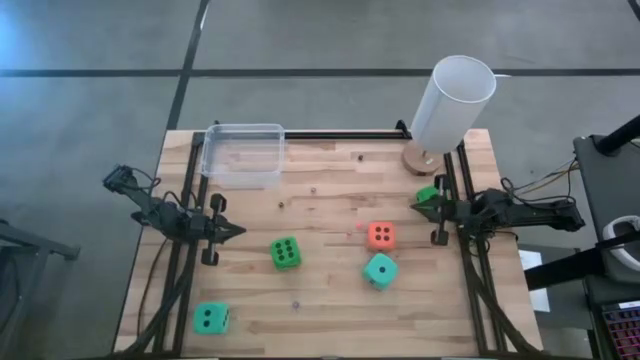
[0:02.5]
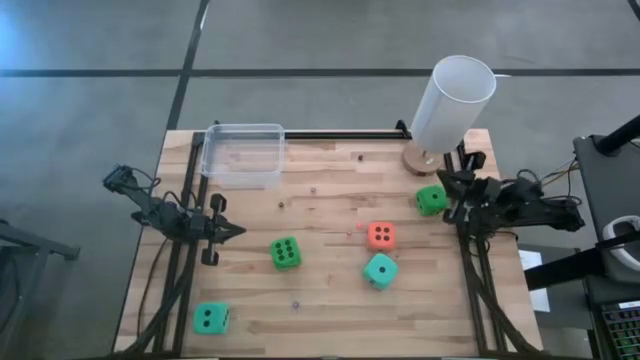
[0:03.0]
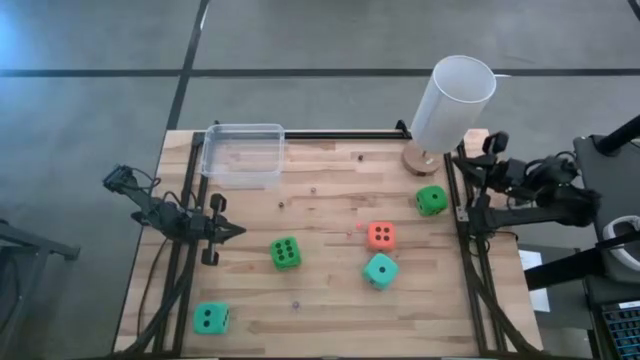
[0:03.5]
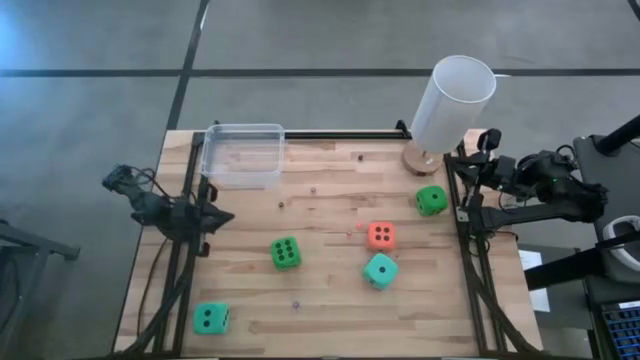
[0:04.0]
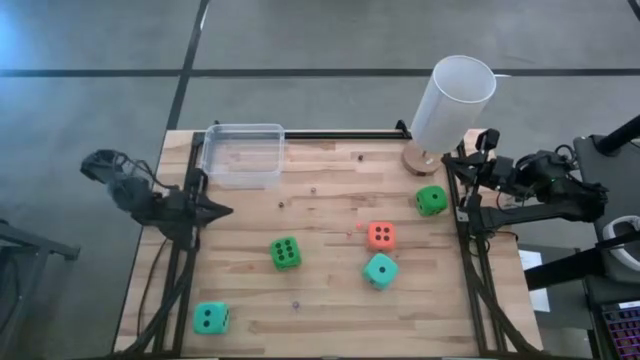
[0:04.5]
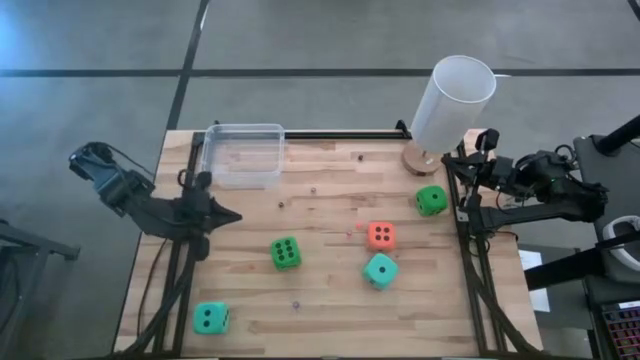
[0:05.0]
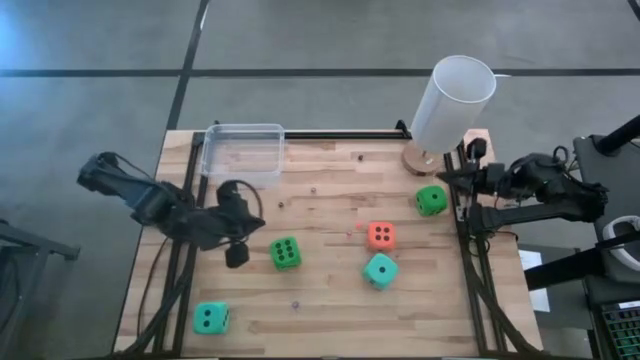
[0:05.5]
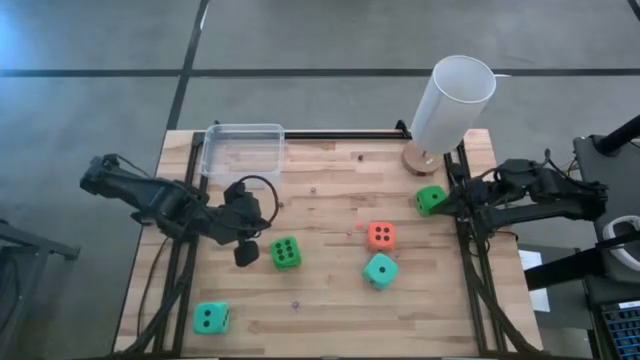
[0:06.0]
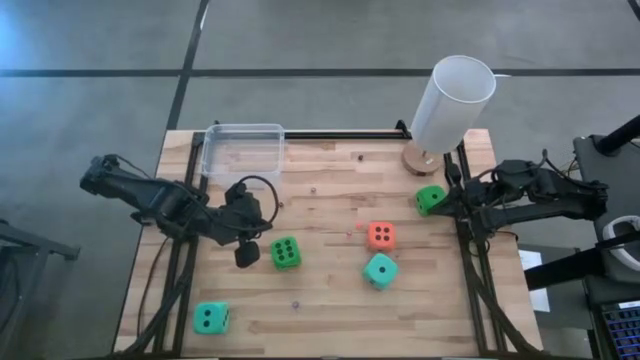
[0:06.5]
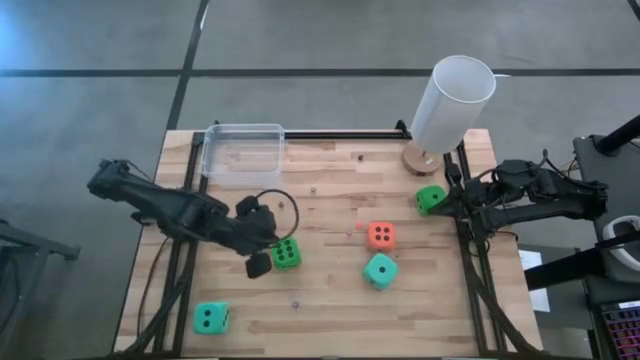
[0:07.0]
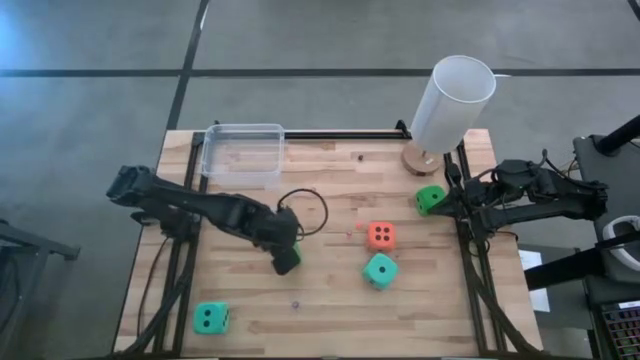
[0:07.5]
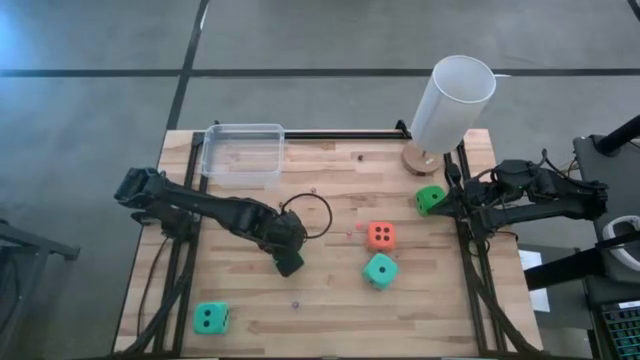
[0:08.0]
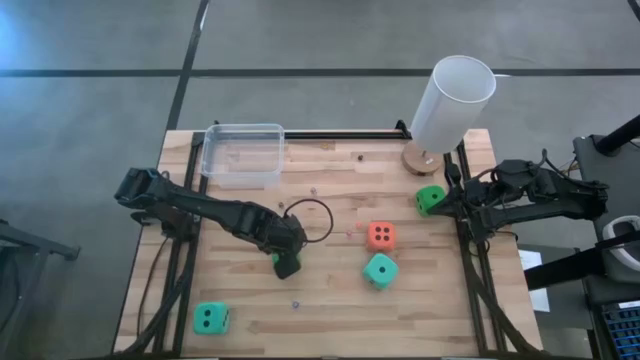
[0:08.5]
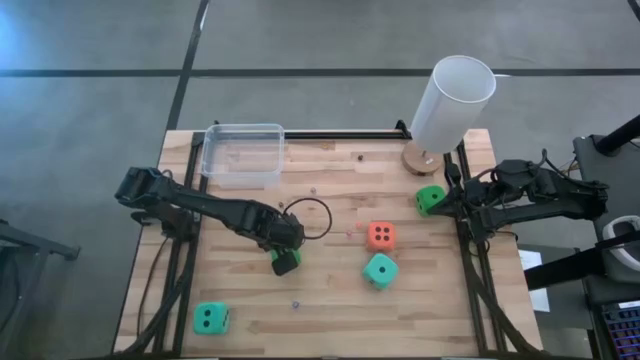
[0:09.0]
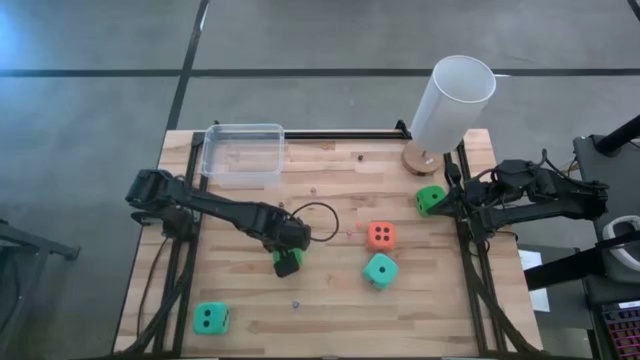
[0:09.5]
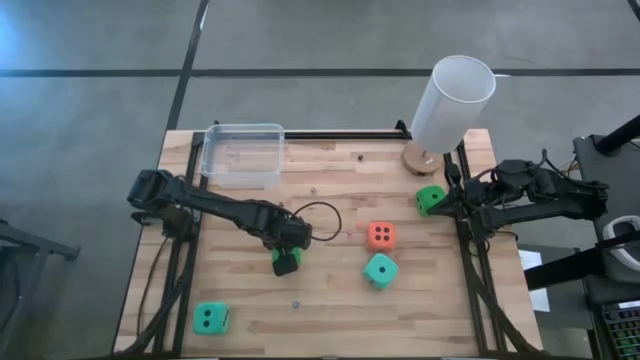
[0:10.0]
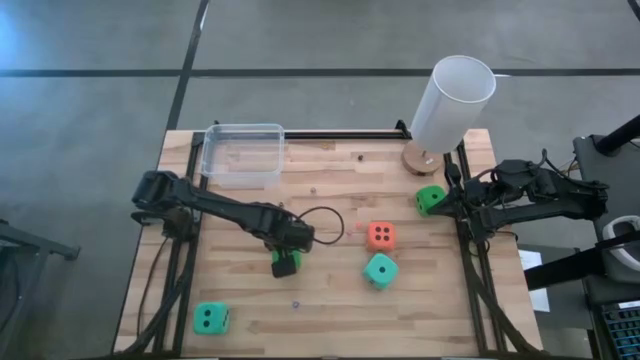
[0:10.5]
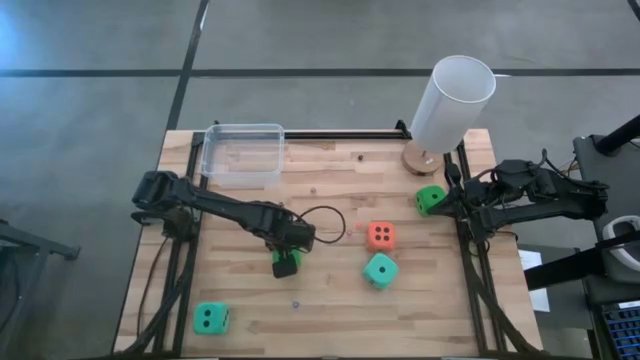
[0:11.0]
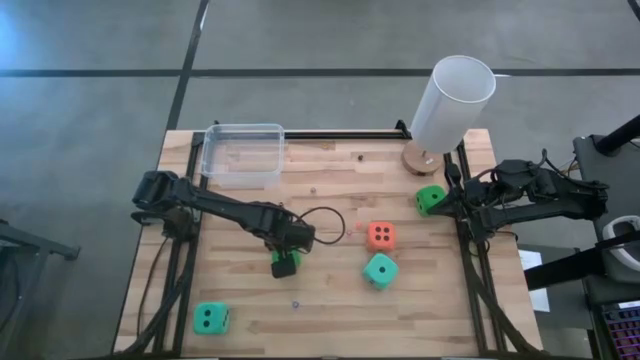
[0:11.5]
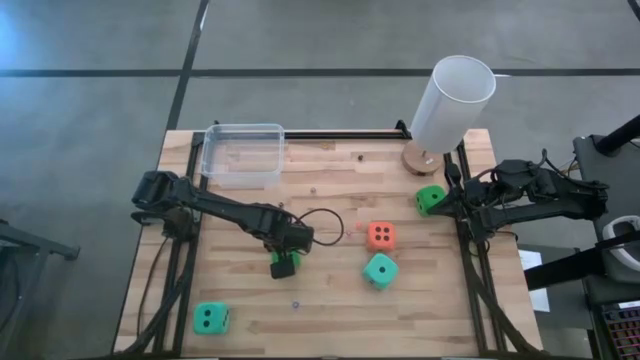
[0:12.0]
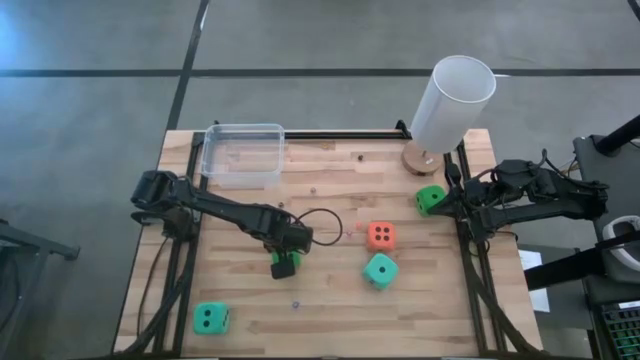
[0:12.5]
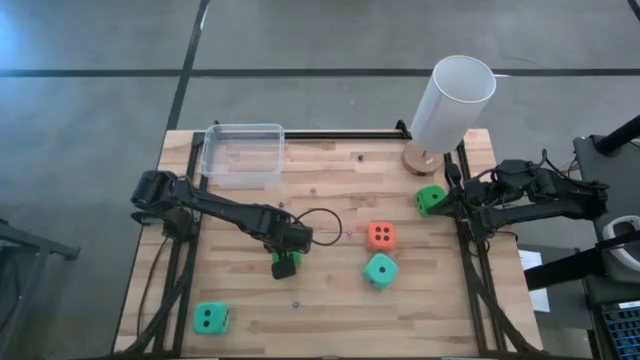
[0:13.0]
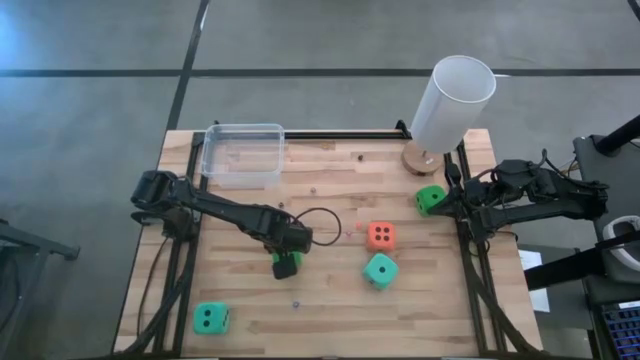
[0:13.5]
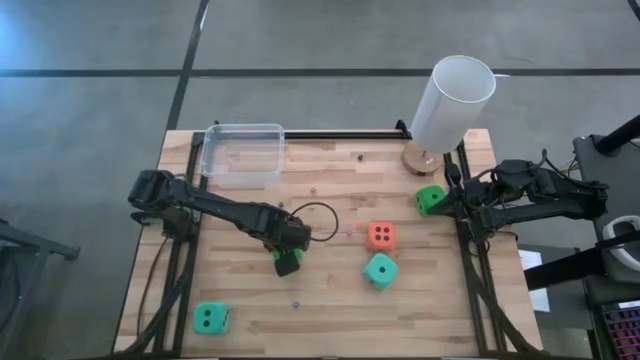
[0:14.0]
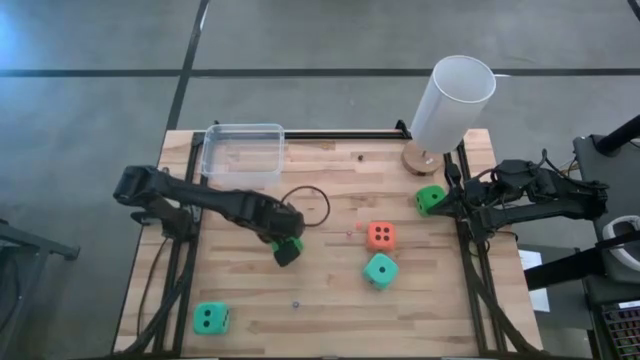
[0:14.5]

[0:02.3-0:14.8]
Task: Pick & Place Dice
Put the left green large dice into the transparent bin

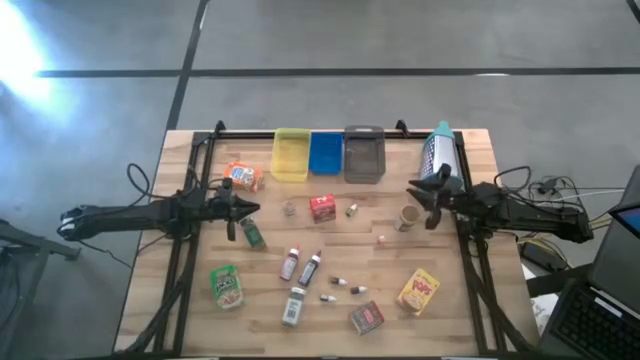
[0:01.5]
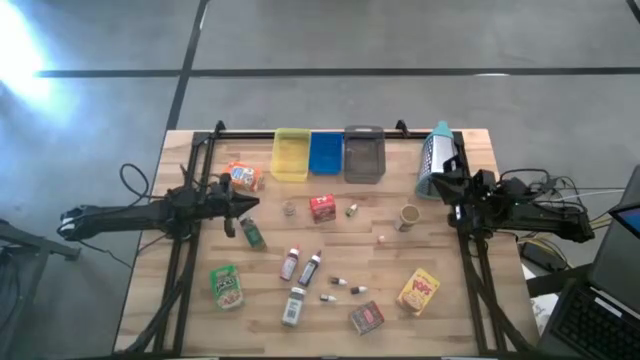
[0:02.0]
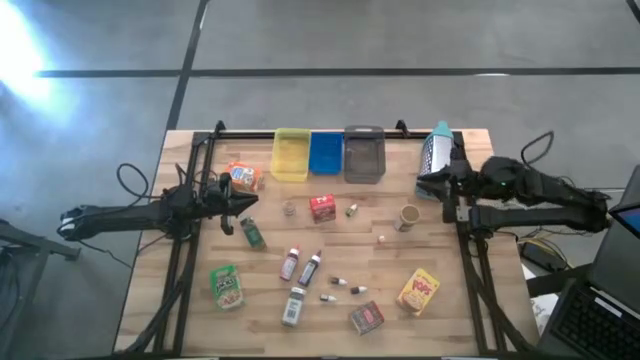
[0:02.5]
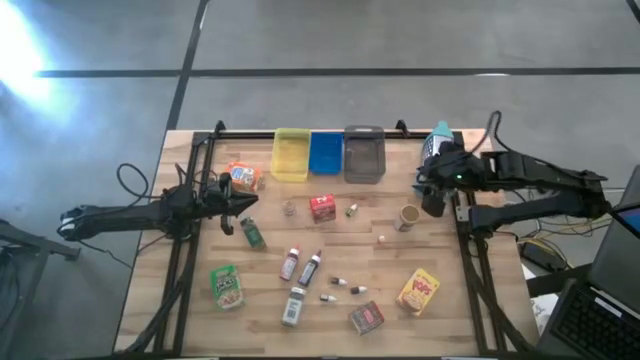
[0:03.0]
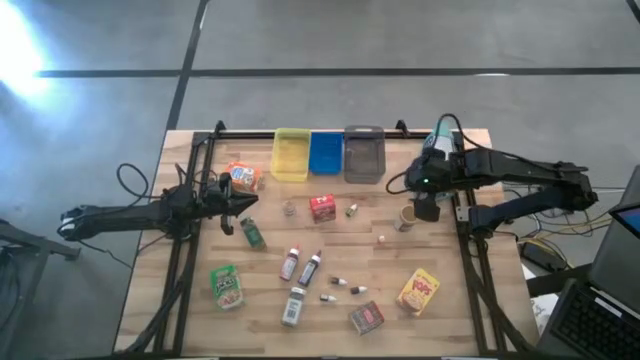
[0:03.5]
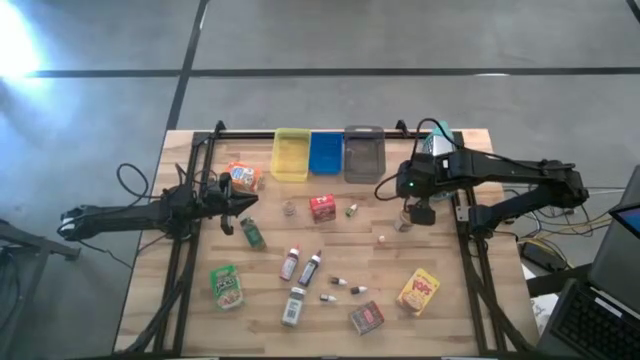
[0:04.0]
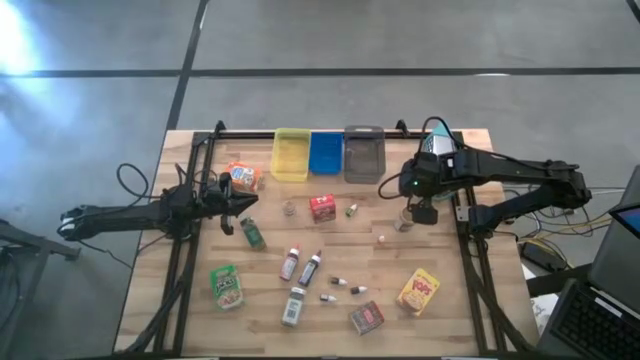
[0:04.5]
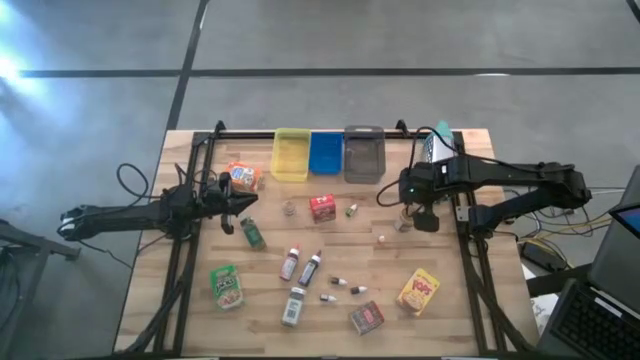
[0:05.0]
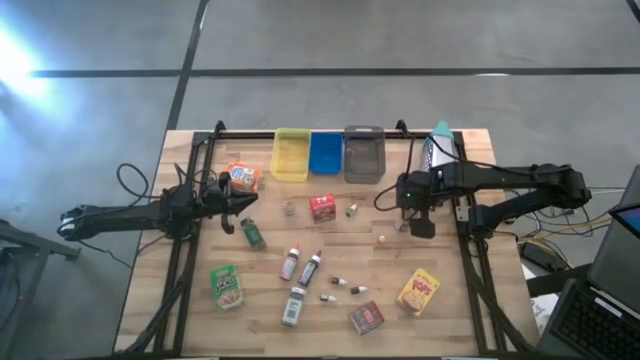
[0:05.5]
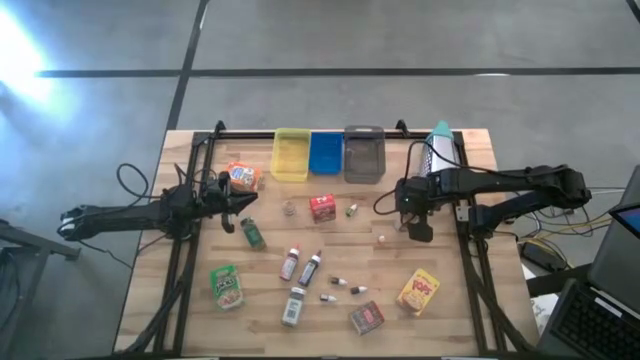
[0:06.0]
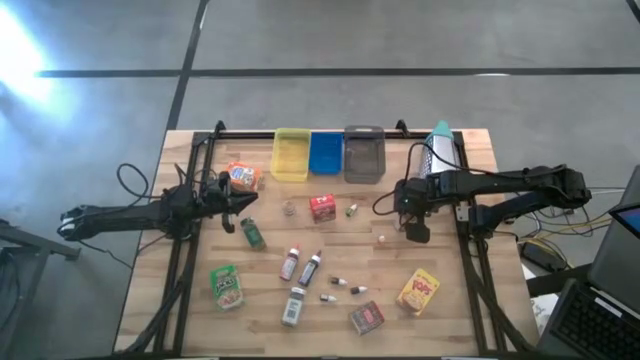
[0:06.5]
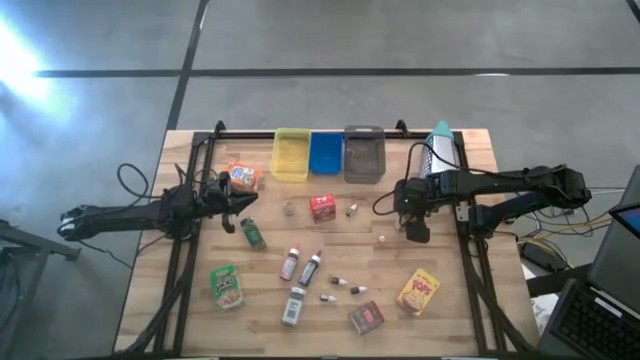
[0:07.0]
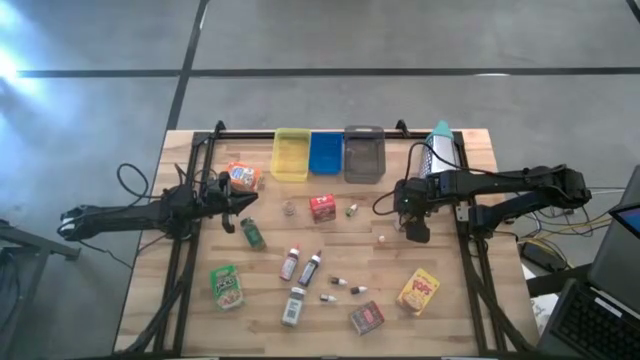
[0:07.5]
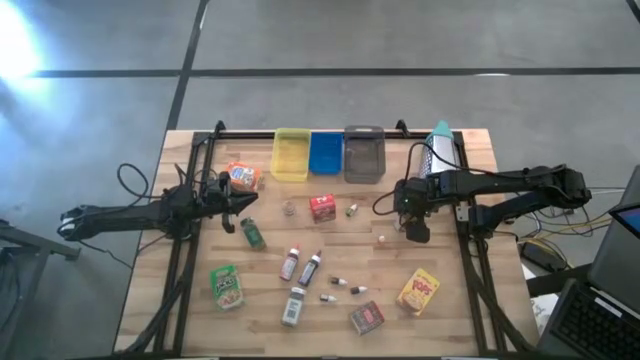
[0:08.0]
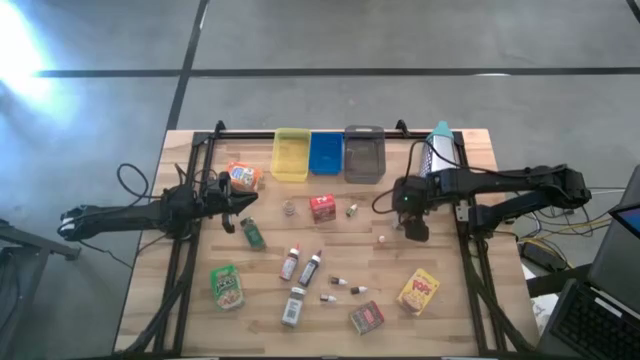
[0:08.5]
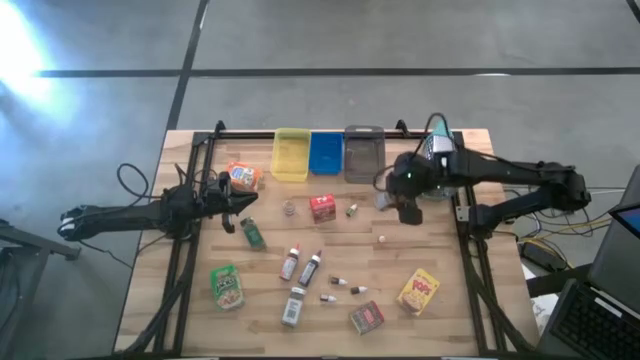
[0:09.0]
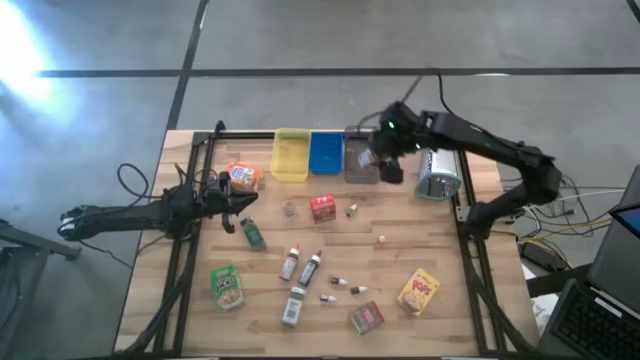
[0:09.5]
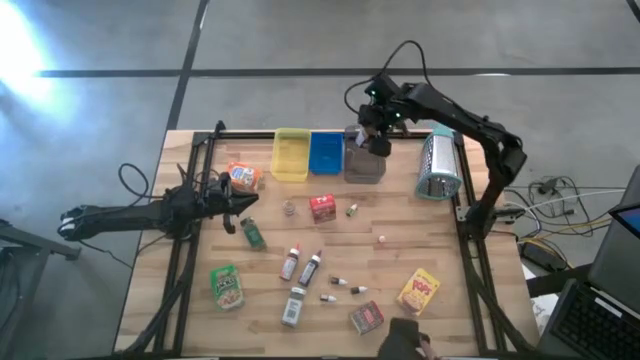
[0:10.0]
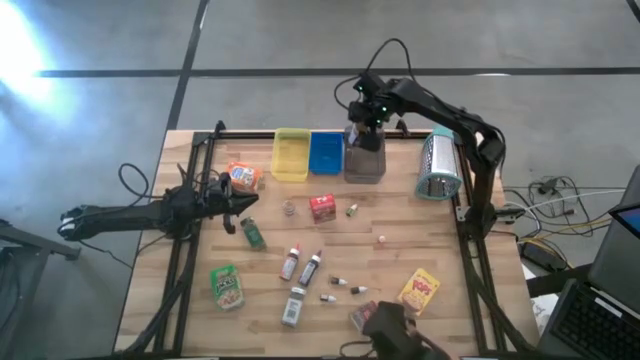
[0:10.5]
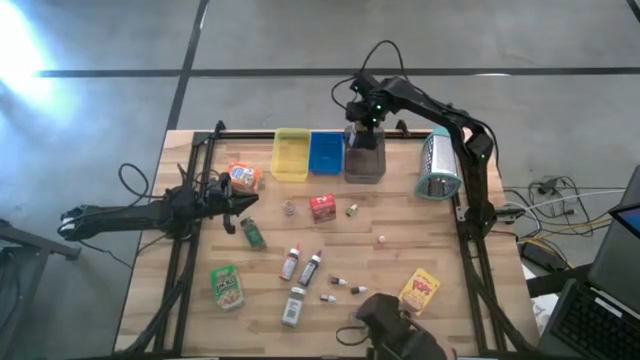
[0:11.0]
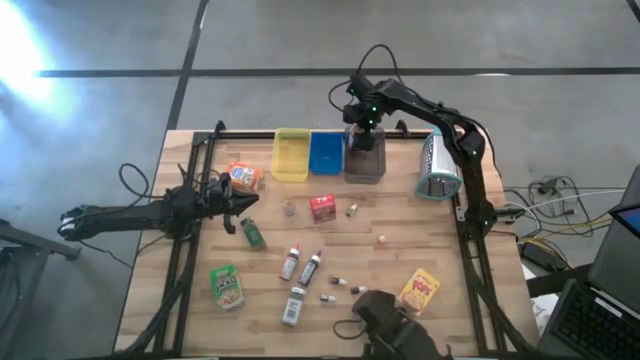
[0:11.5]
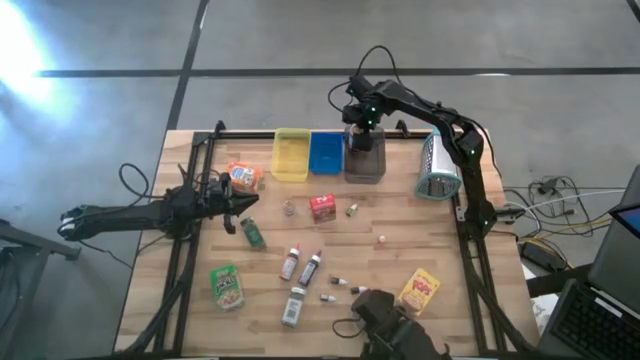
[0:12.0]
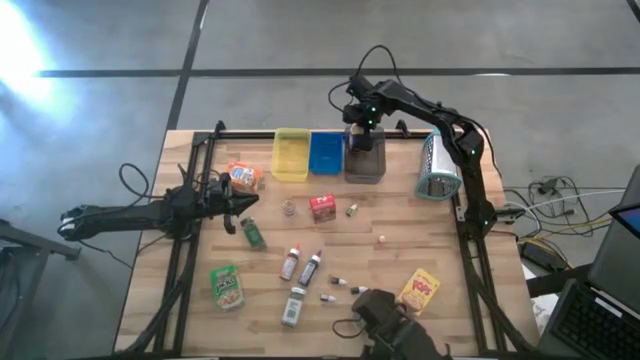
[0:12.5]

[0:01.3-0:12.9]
Task: Pick & Place Kitchen Items
Put the gold seasoning bottle into the black bin
